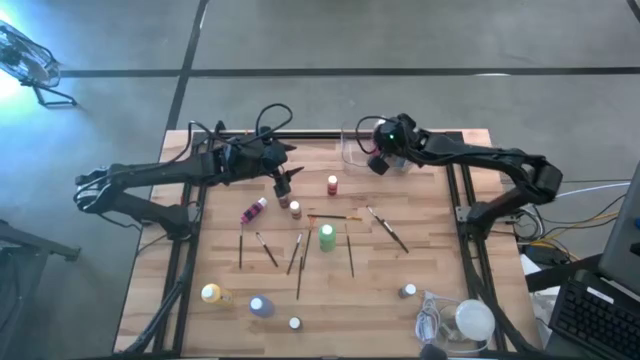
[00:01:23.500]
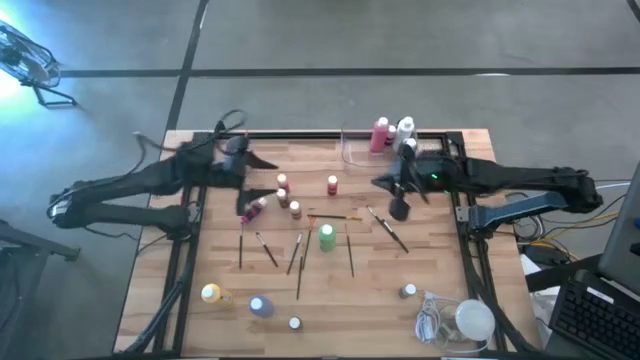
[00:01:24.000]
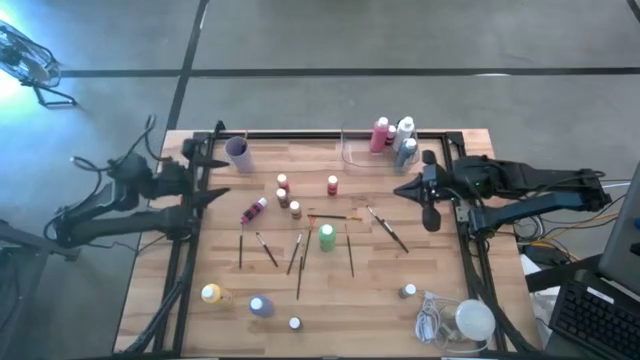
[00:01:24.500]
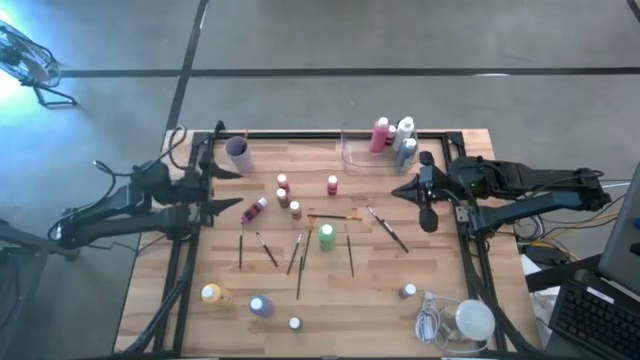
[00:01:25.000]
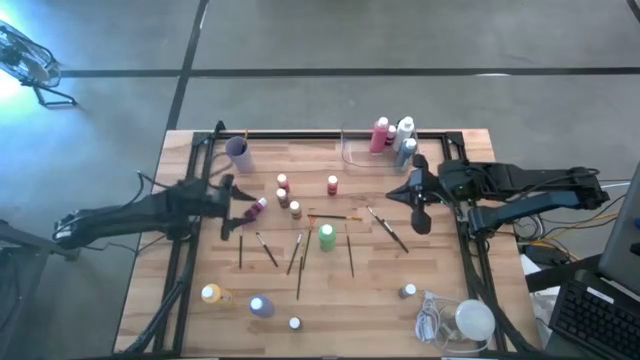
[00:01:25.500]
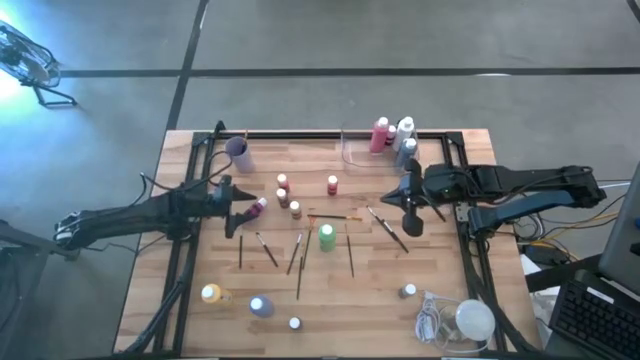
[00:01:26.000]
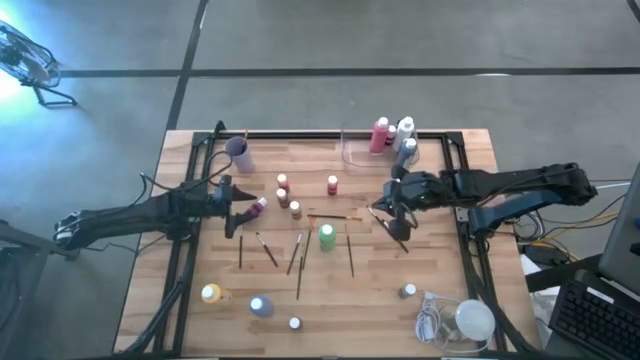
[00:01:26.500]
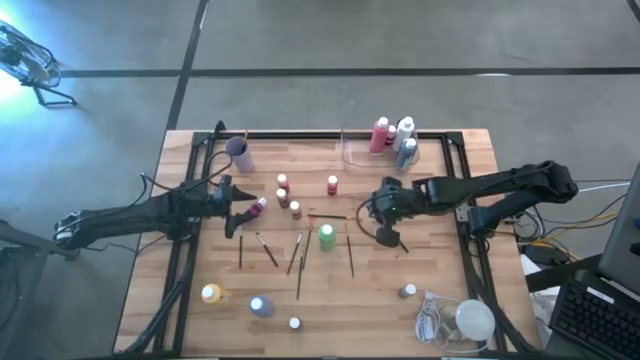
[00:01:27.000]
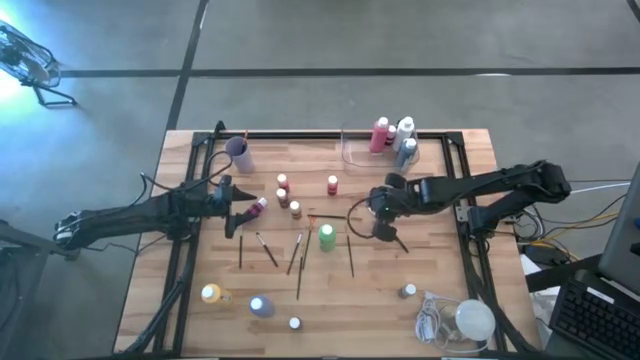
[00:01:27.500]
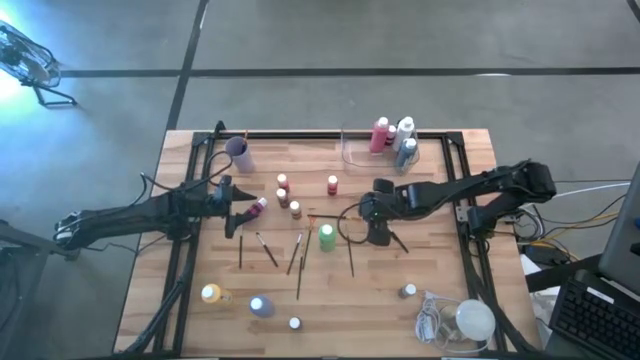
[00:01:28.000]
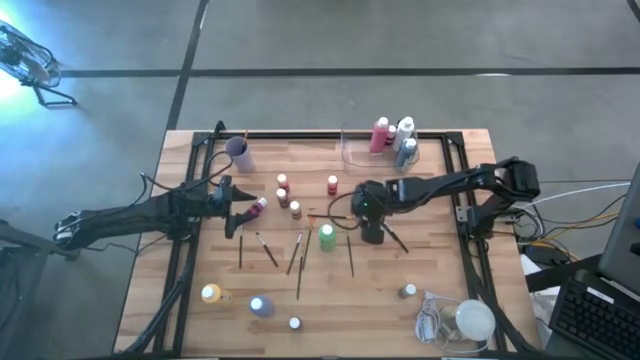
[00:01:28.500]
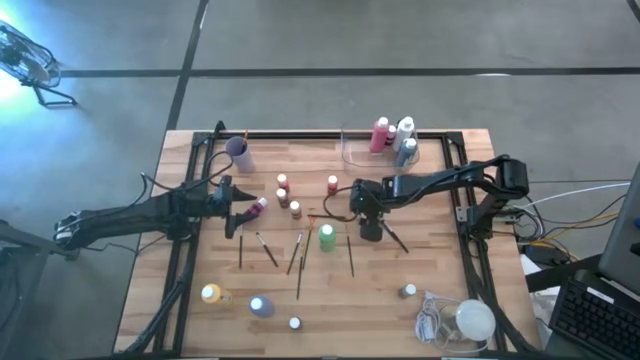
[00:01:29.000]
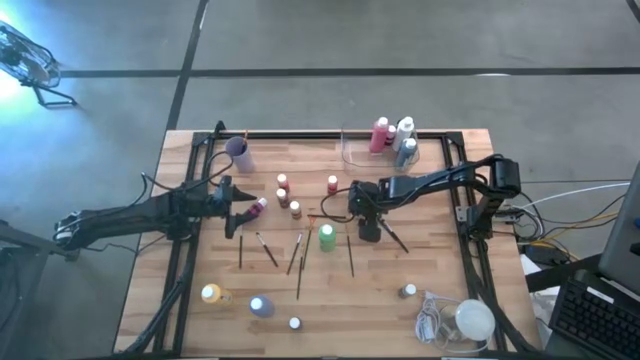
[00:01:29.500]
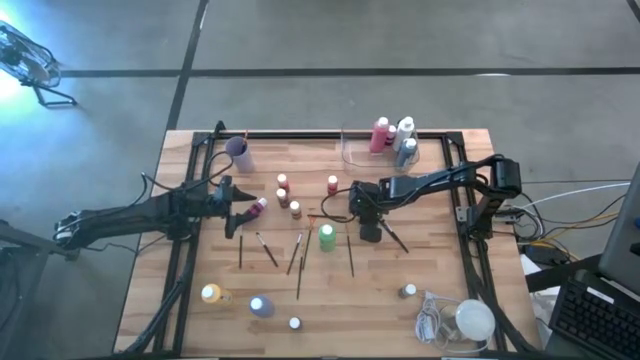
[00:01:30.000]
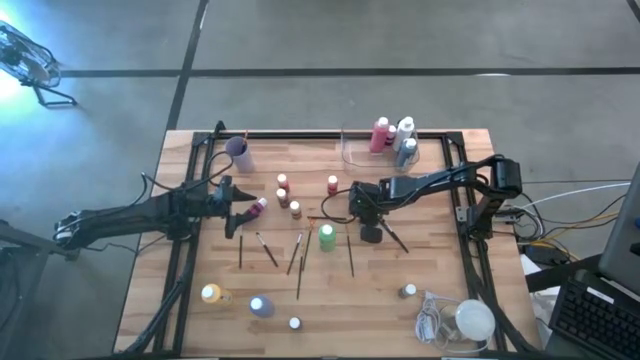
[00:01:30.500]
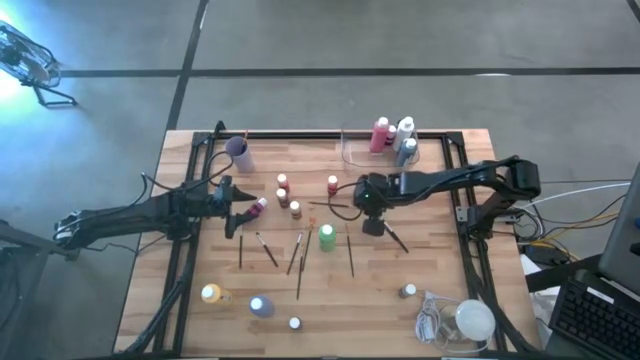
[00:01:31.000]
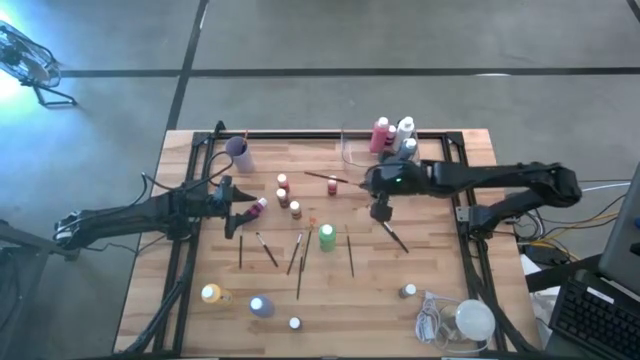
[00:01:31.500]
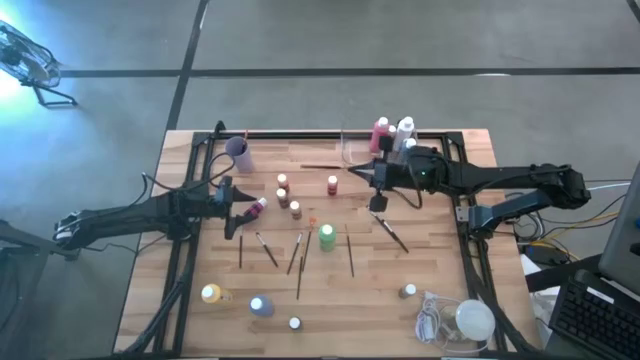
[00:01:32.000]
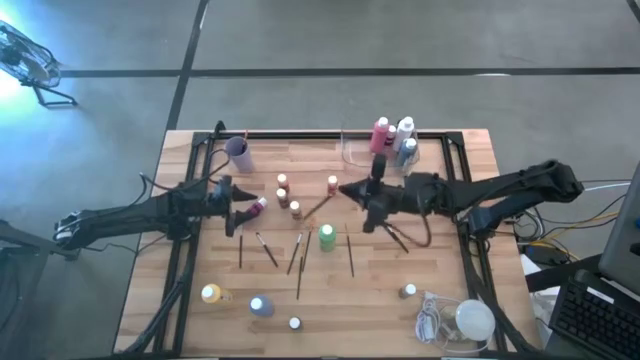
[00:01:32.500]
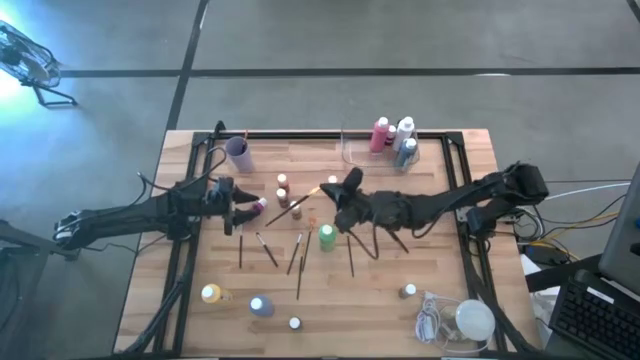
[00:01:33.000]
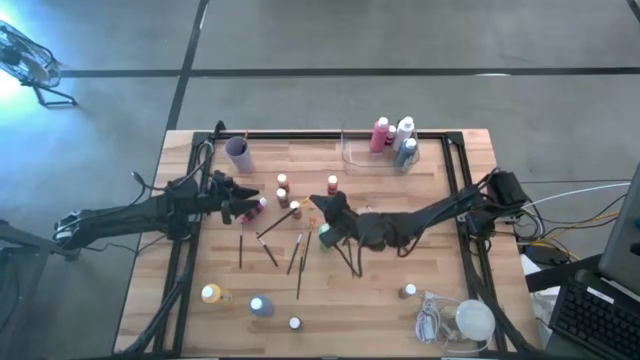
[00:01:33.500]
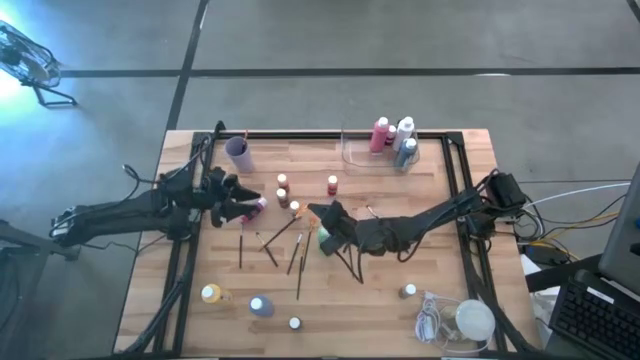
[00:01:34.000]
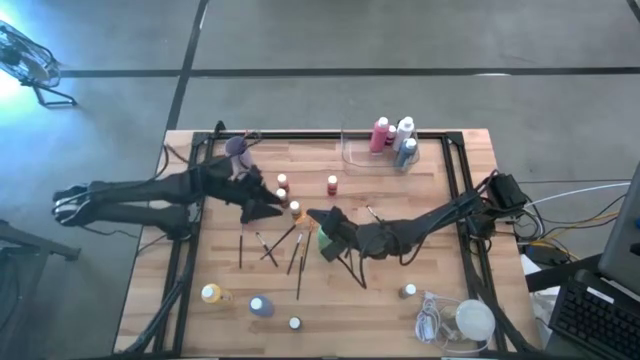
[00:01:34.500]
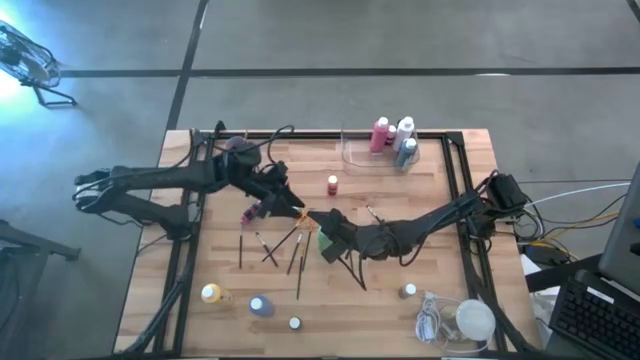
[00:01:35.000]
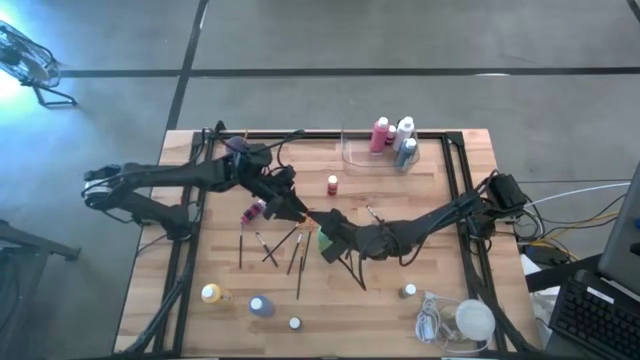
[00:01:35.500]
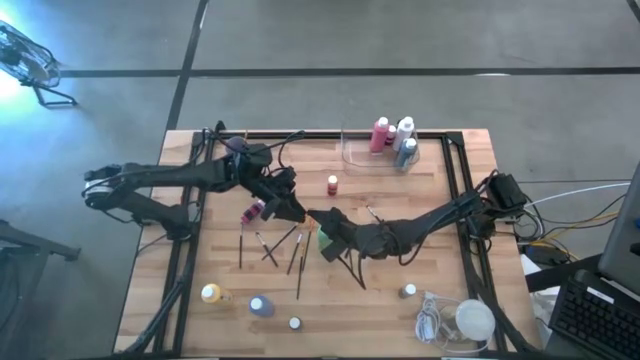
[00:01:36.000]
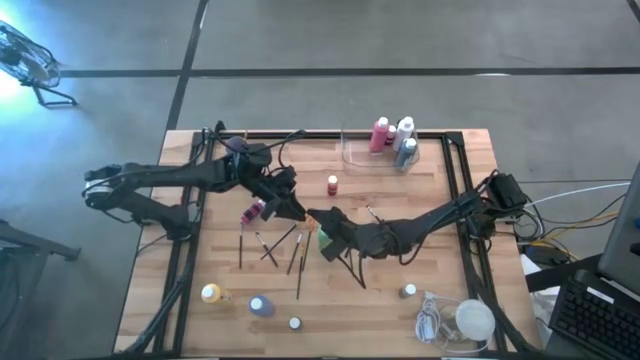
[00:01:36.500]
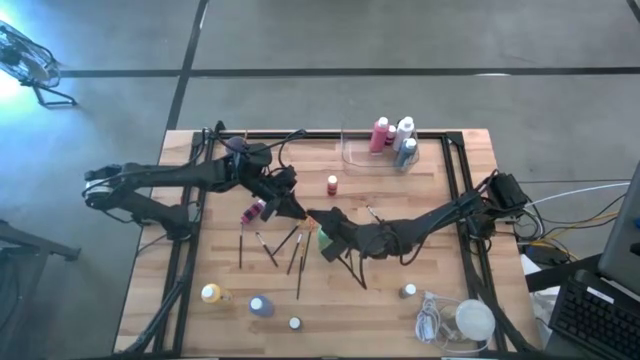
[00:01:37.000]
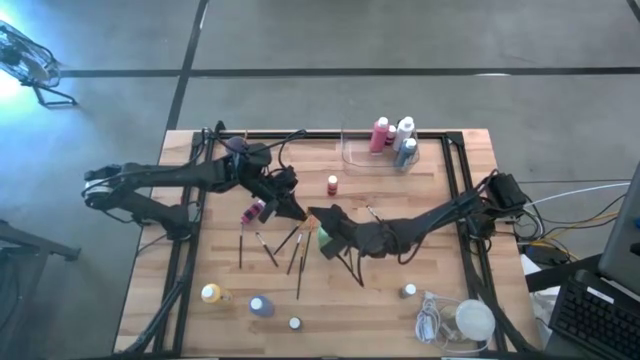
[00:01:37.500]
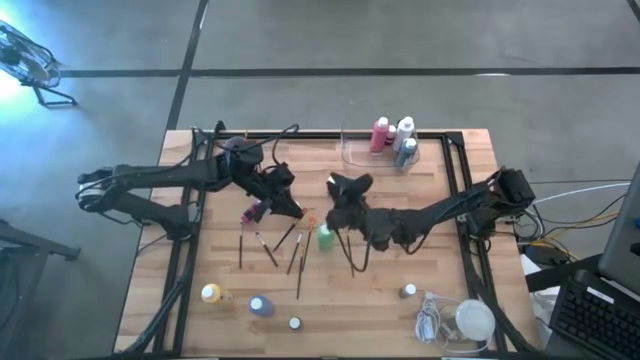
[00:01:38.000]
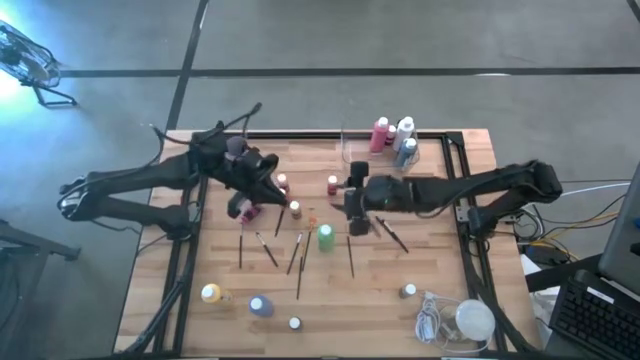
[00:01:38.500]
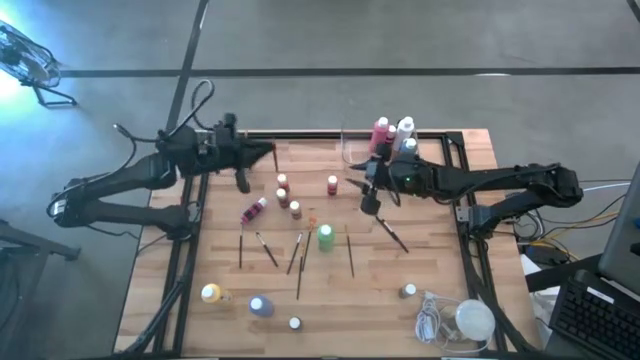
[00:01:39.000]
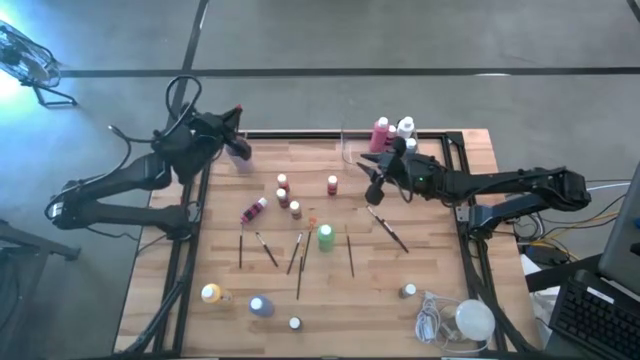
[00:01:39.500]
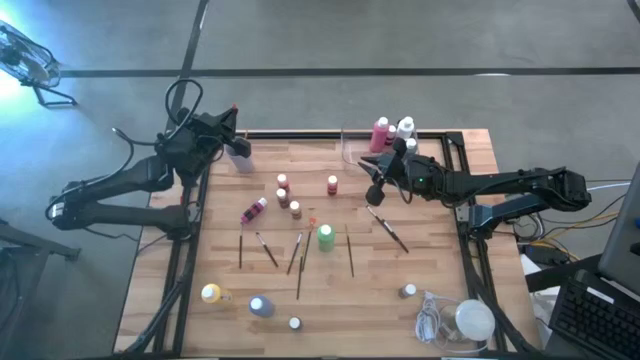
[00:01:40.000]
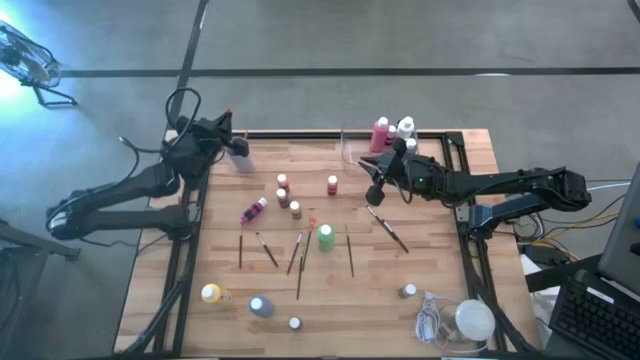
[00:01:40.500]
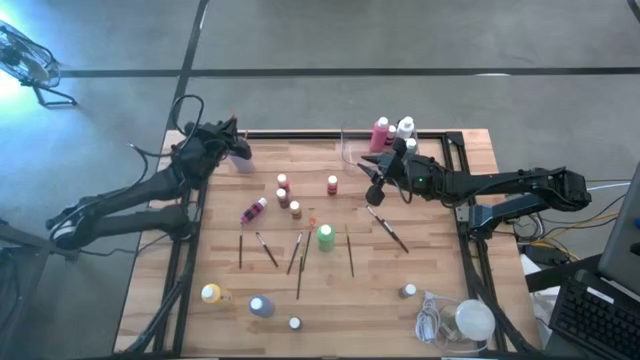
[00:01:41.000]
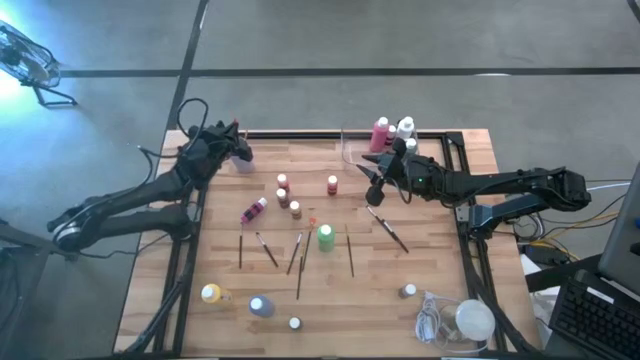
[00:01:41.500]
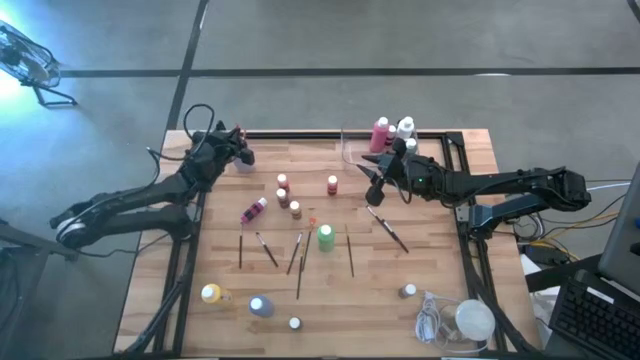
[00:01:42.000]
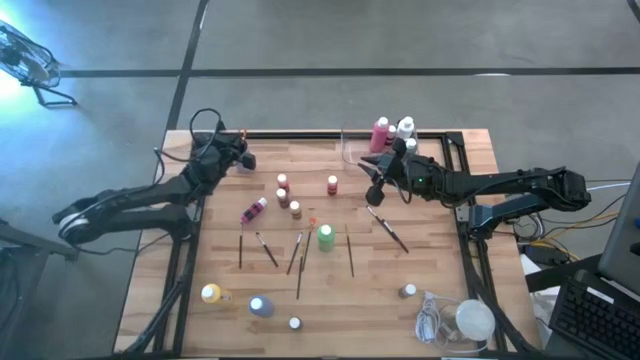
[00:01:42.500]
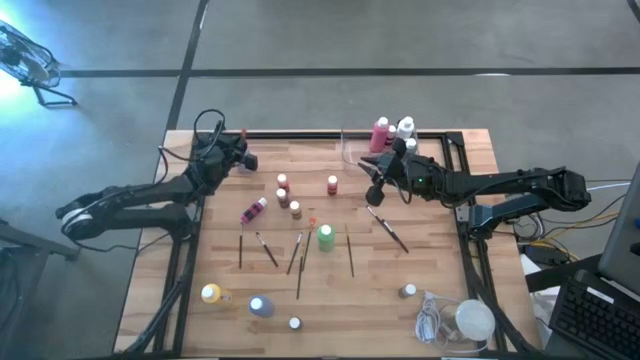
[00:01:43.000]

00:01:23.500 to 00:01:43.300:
Task: Pick & Place Paint Supplies
Put the gold paint brush into the violet cup
